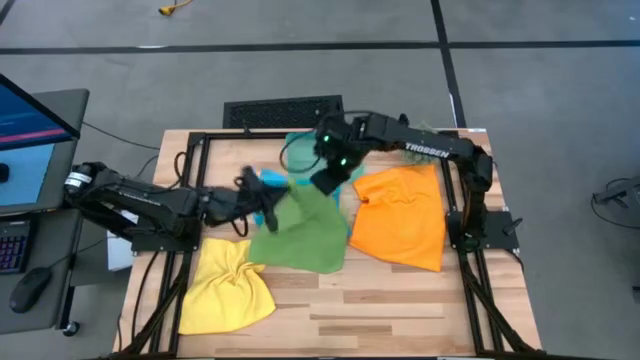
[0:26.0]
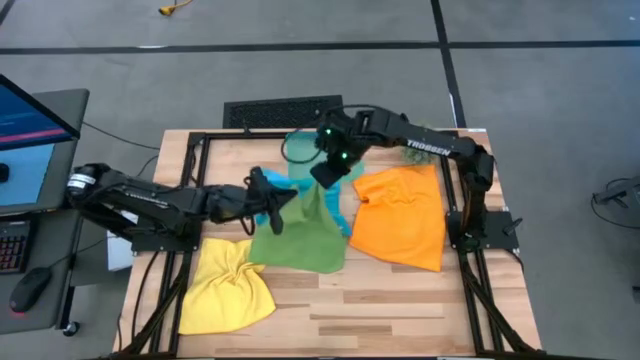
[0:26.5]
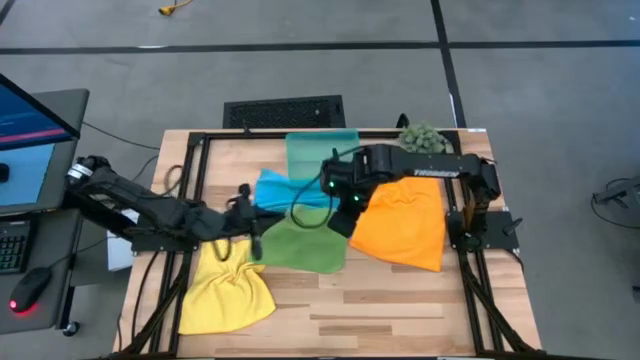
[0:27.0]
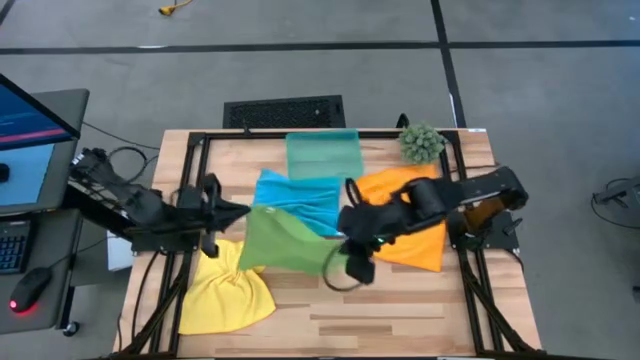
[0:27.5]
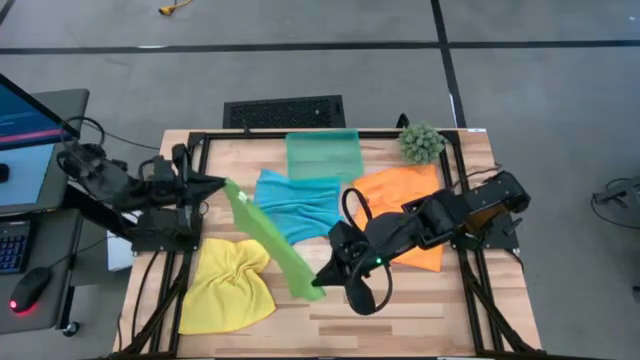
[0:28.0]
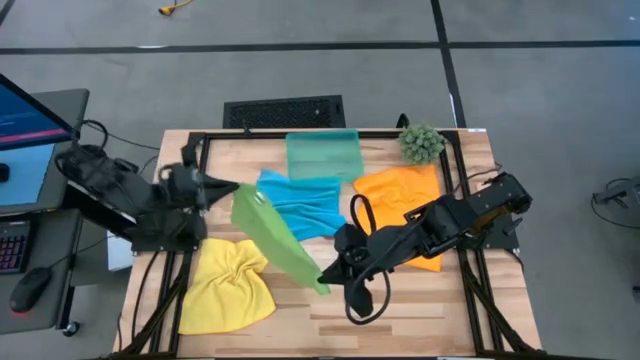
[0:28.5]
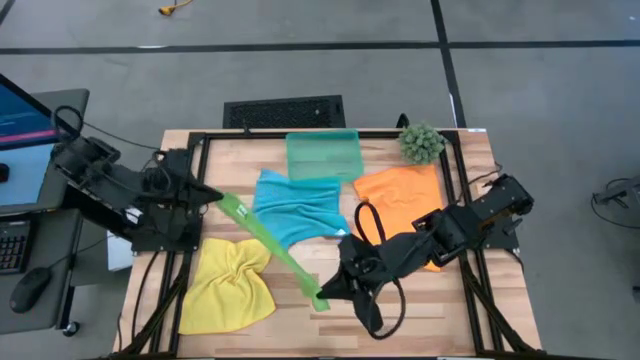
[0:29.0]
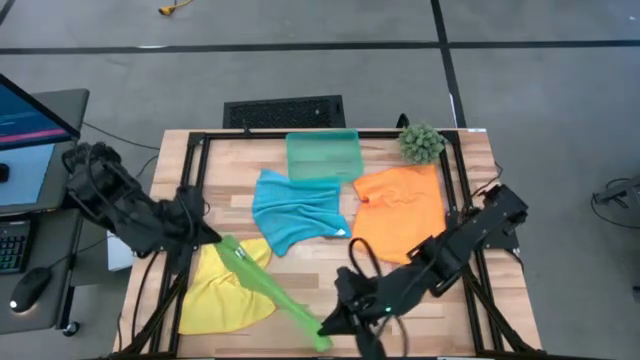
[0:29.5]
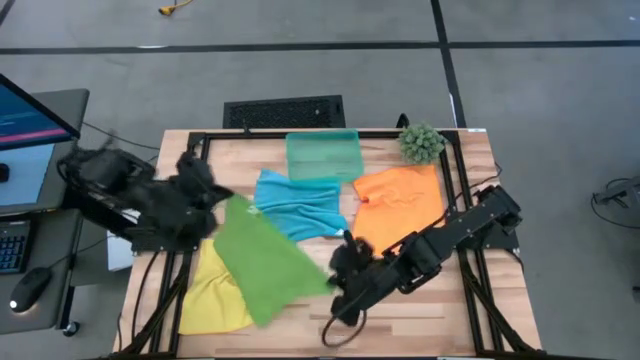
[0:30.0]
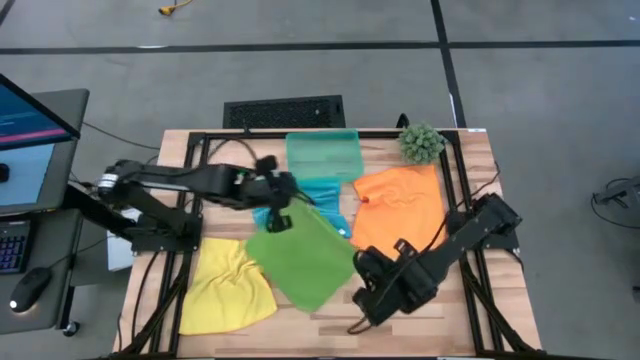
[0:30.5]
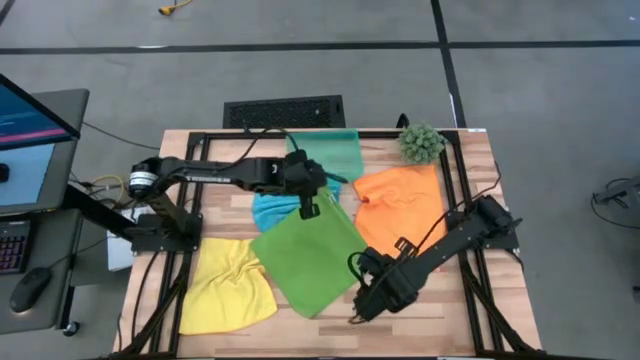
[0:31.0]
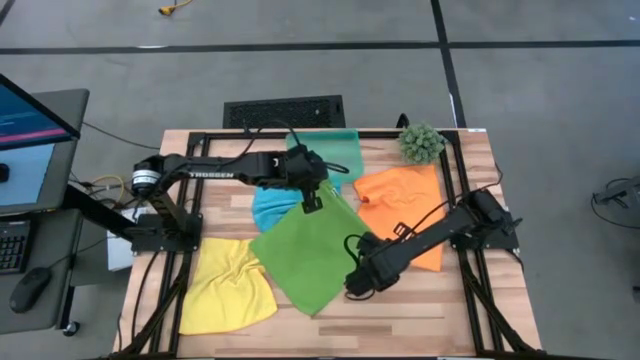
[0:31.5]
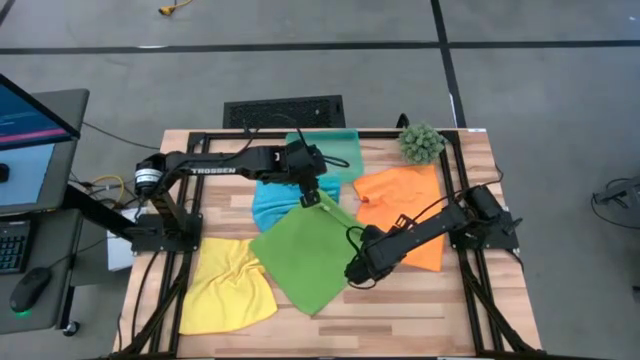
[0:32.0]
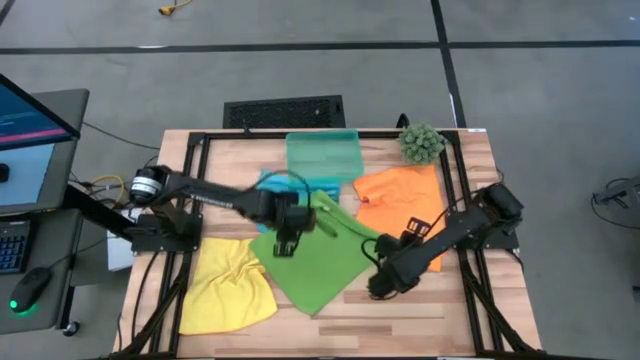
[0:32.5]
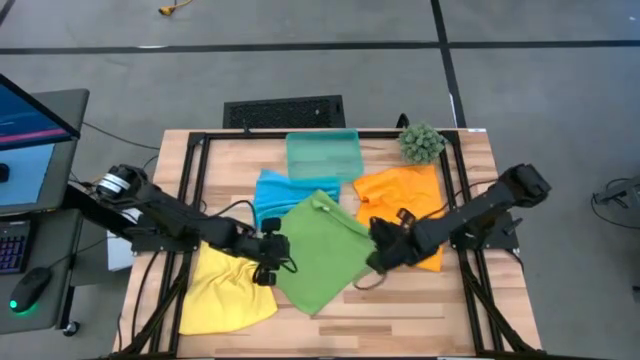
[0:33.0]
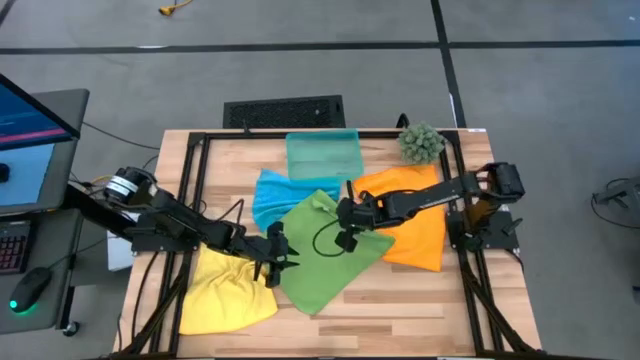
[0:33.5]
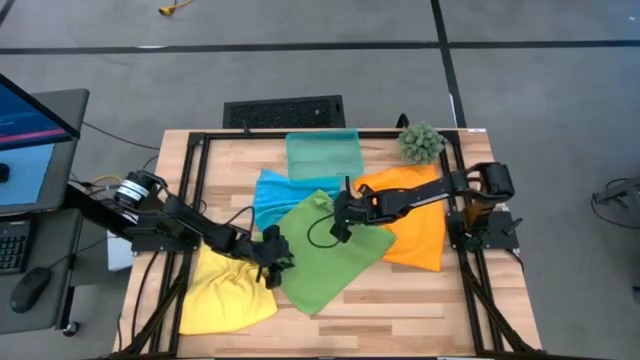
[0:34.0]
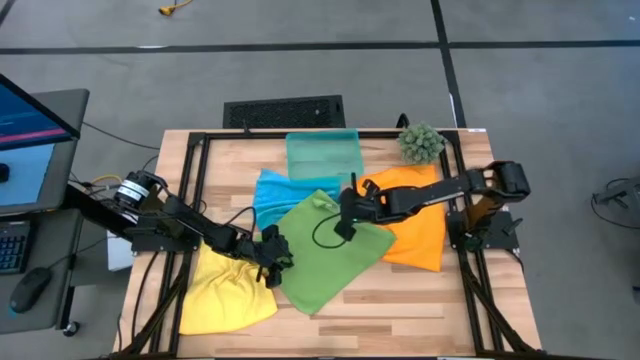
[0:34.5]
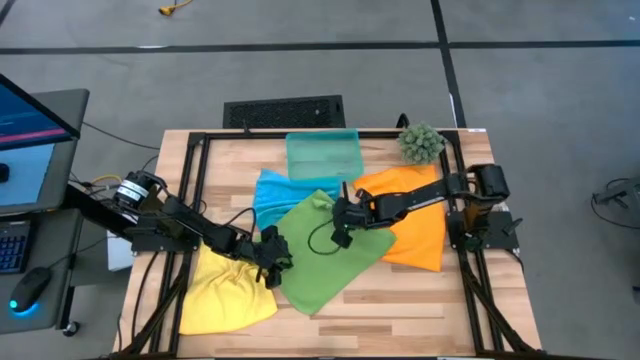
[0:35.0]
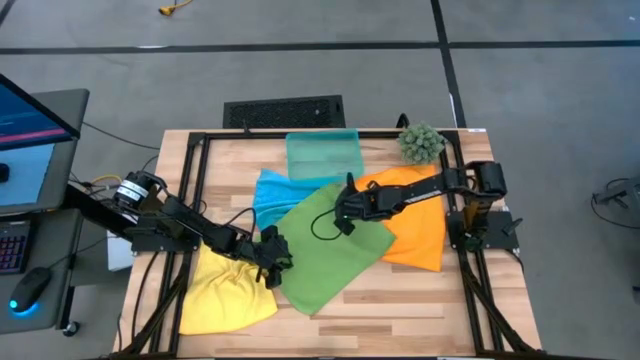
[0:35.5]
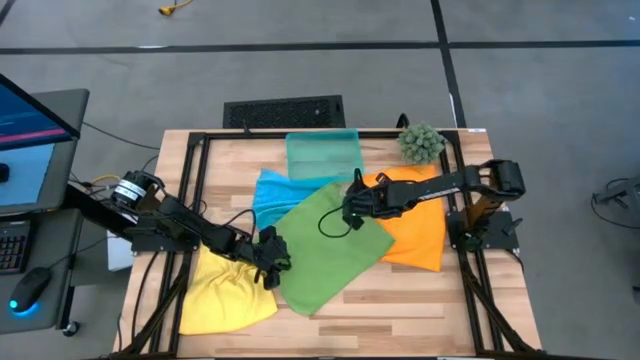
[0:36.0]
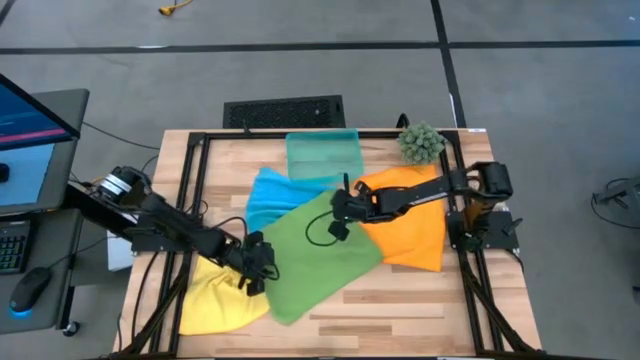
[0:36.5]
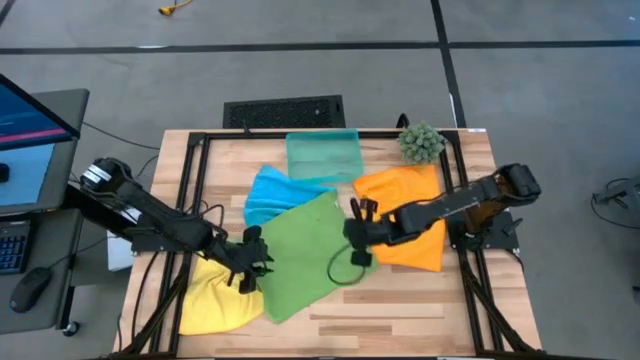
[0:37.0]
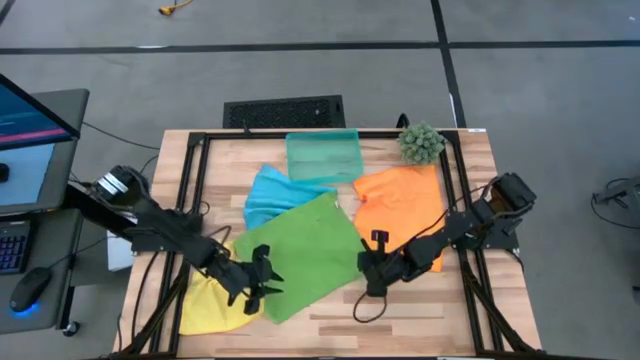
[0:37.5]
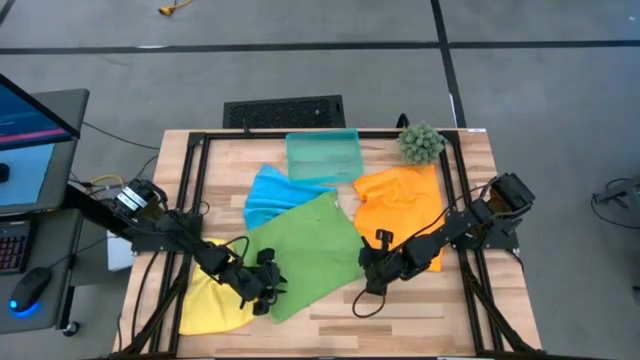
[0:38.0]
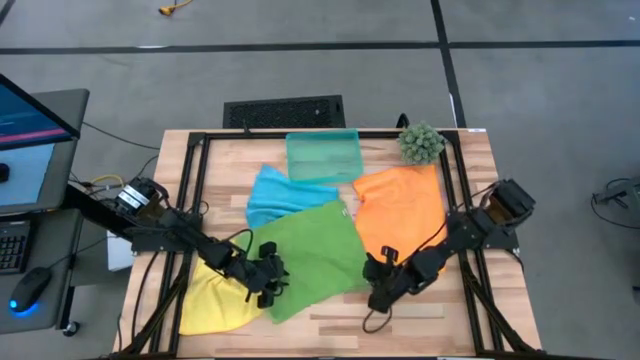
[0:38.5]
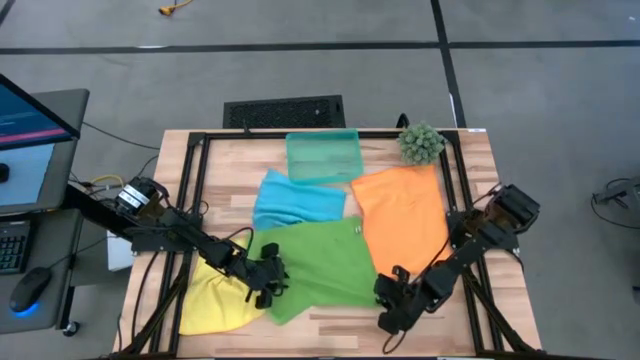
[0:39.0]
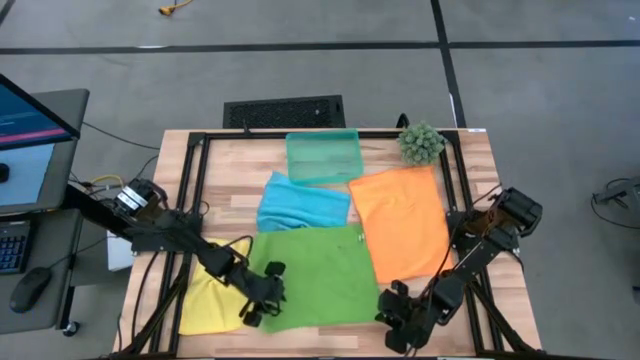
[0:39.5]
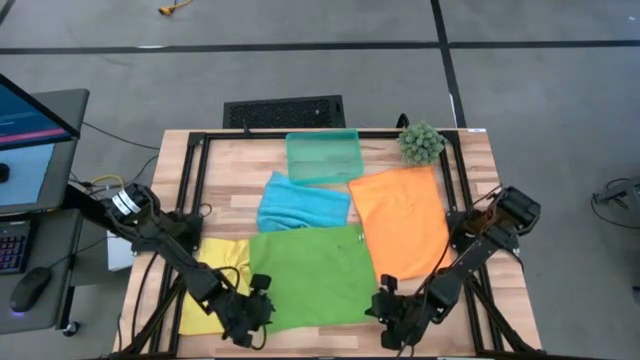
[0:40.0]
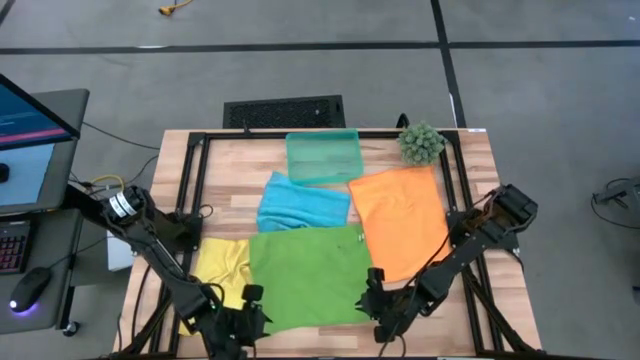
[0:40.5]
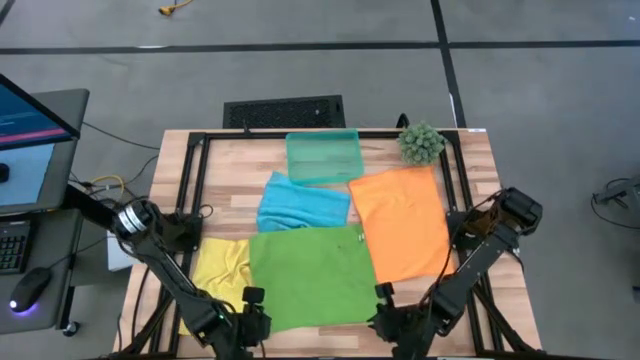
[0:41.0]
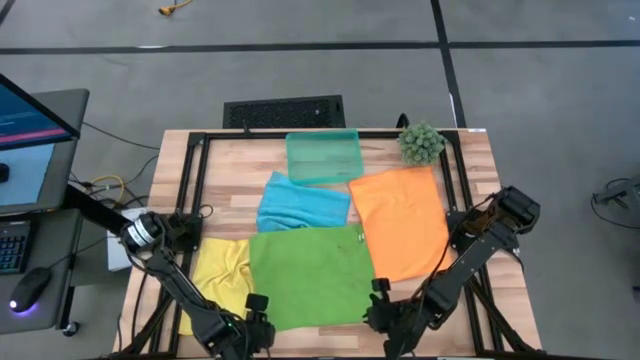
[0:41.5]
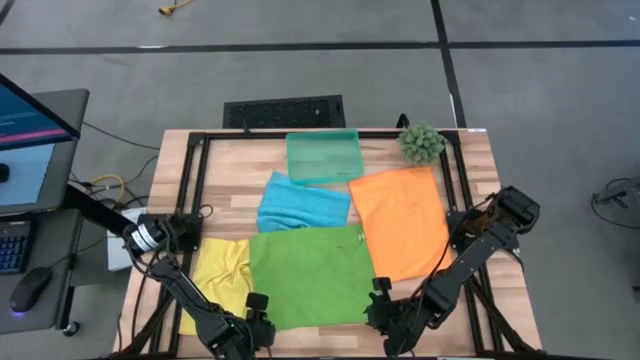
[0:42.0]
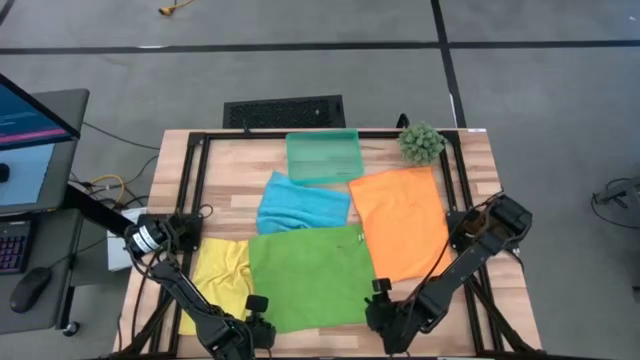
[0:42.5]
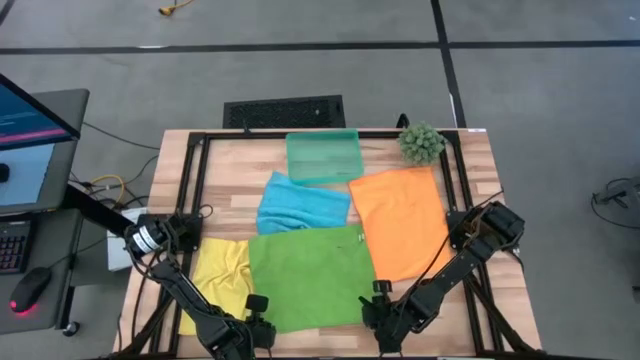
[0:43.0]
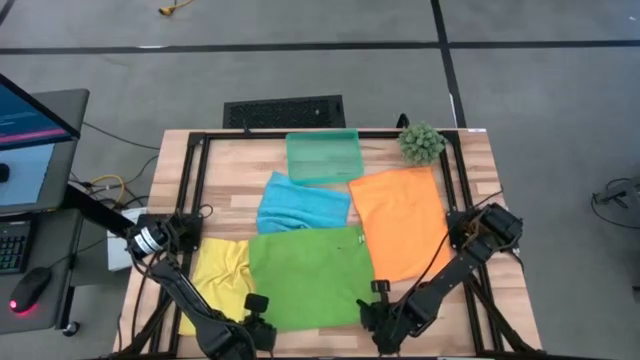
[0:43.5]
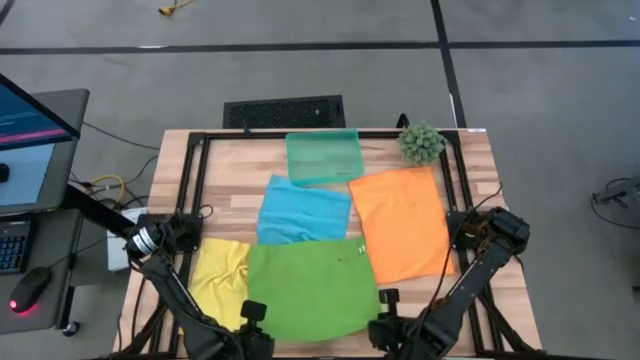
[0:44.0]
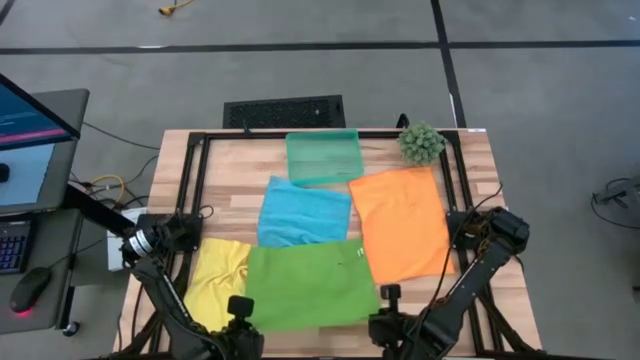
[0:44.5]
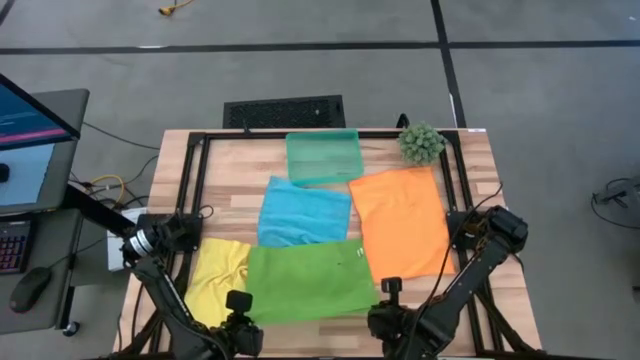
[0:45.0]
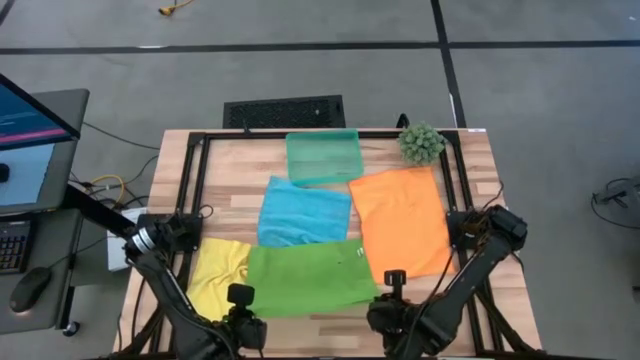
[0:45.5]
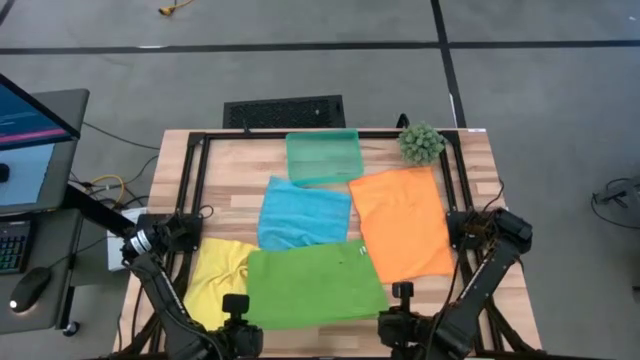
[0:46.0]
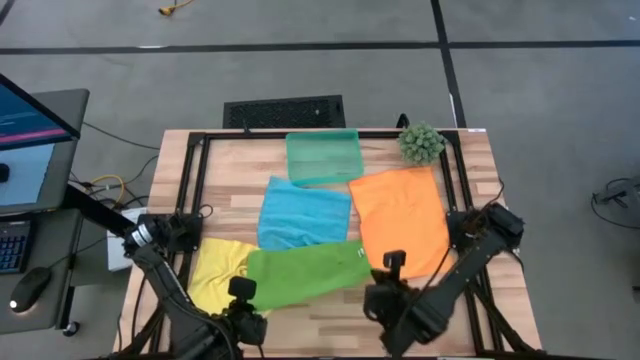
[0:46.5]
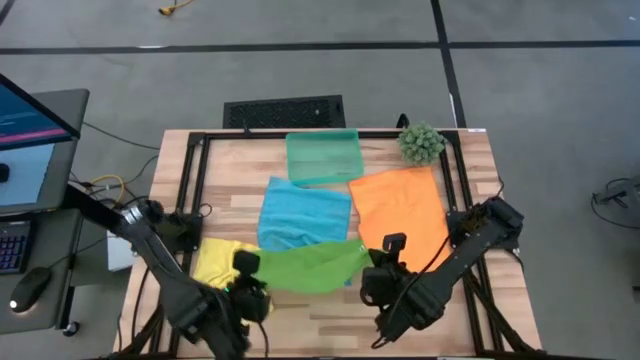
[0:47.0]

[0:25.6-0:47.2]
Task: Roll microfiber towels into tight, uniform cylinder then place into a basket
Roll the green microfiber cloth
